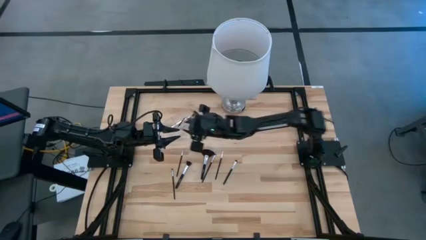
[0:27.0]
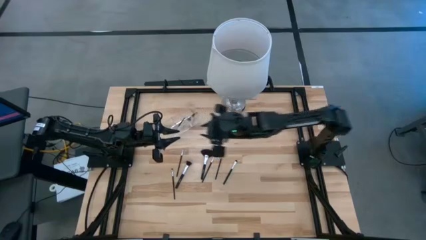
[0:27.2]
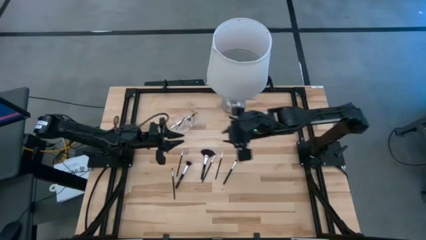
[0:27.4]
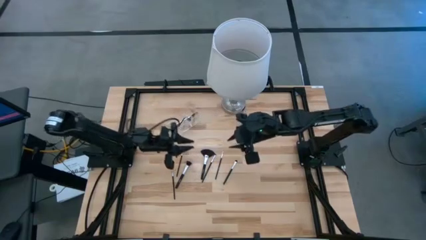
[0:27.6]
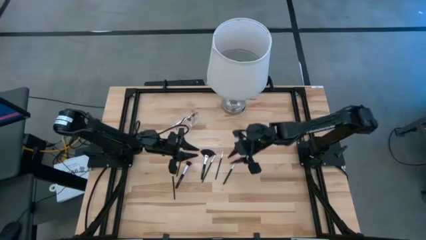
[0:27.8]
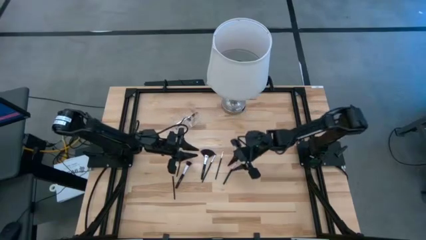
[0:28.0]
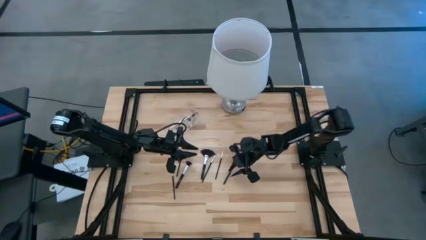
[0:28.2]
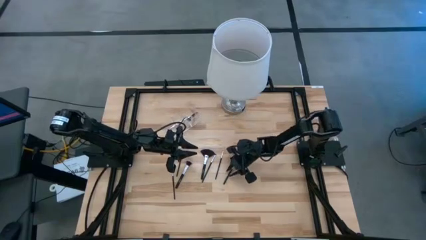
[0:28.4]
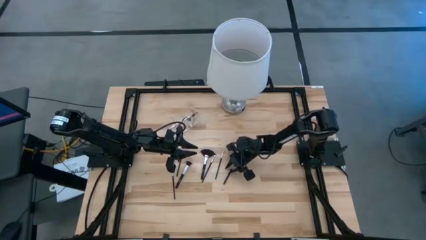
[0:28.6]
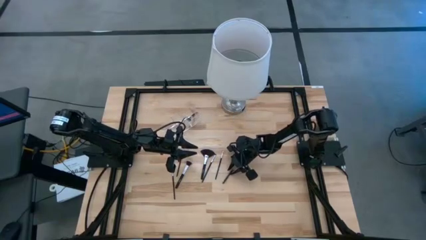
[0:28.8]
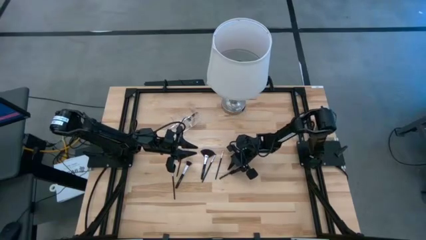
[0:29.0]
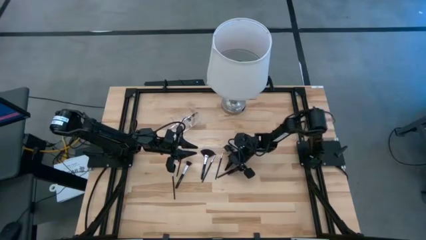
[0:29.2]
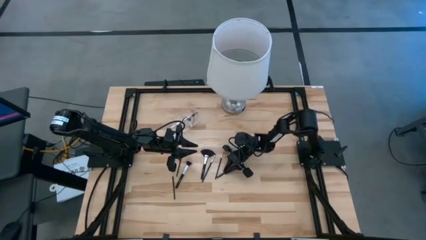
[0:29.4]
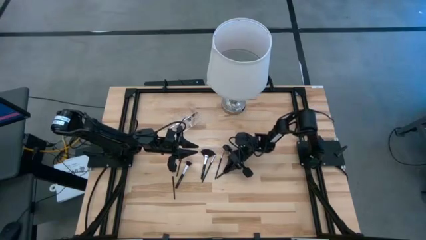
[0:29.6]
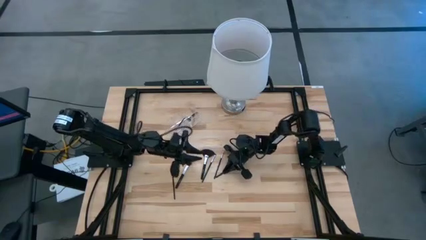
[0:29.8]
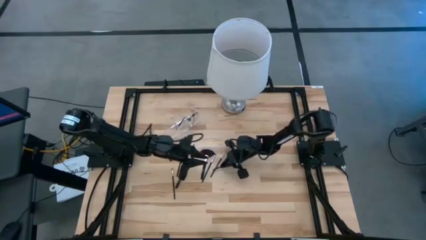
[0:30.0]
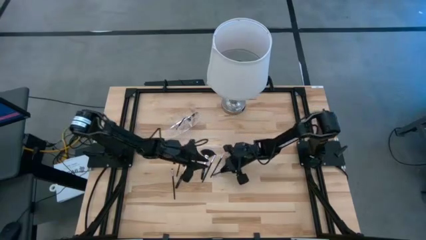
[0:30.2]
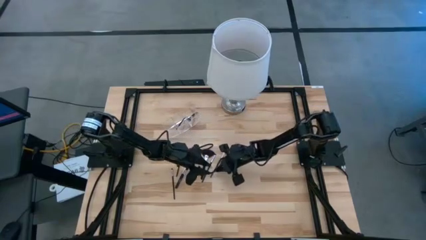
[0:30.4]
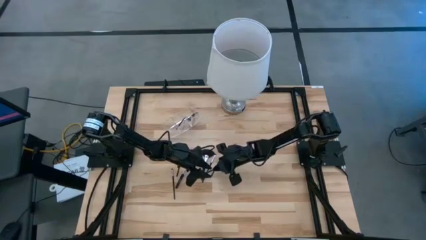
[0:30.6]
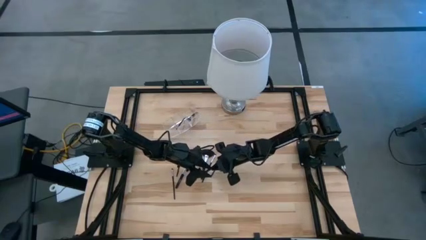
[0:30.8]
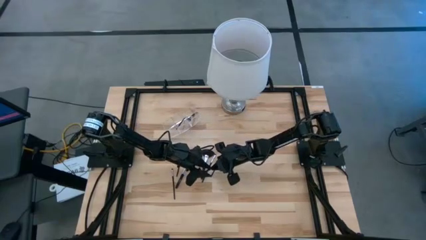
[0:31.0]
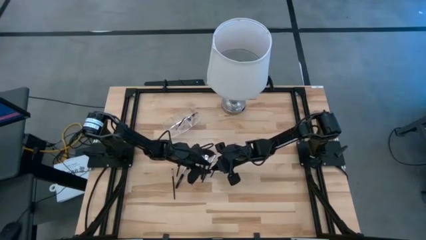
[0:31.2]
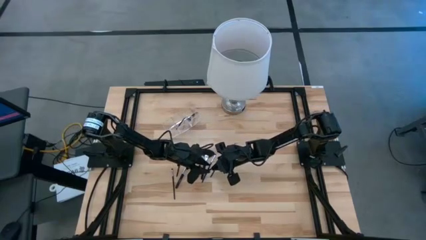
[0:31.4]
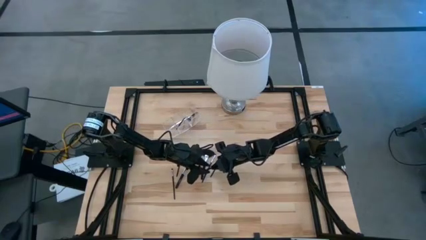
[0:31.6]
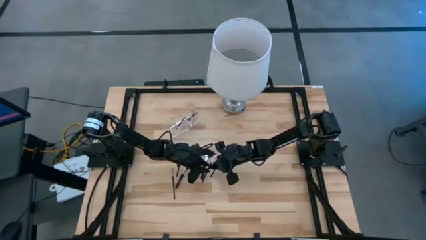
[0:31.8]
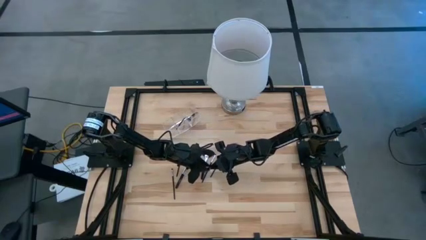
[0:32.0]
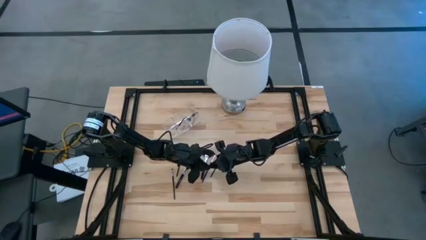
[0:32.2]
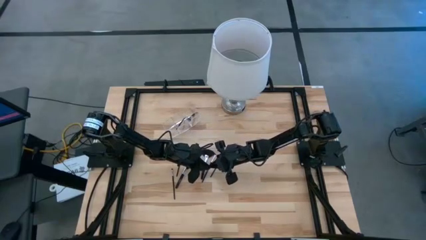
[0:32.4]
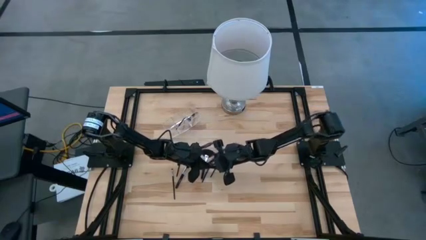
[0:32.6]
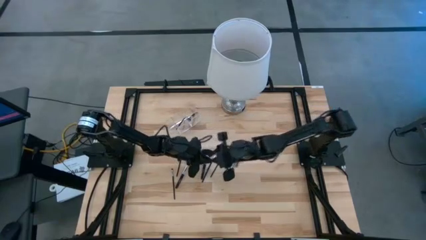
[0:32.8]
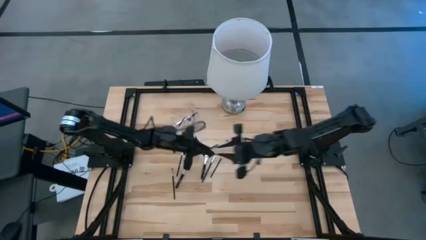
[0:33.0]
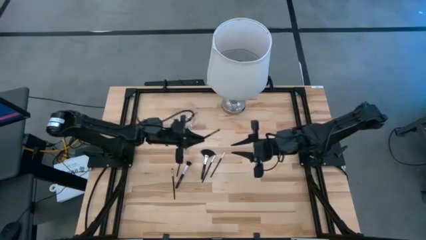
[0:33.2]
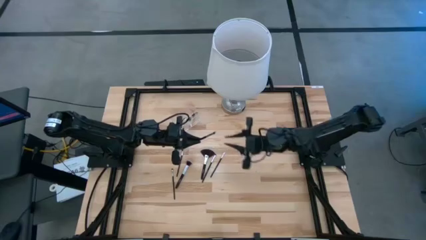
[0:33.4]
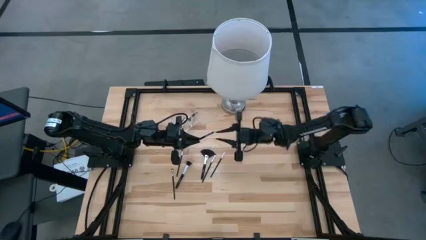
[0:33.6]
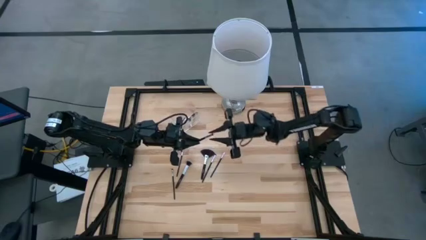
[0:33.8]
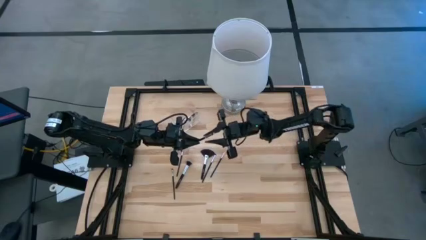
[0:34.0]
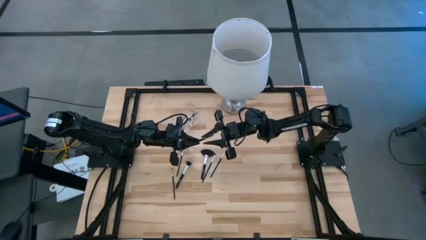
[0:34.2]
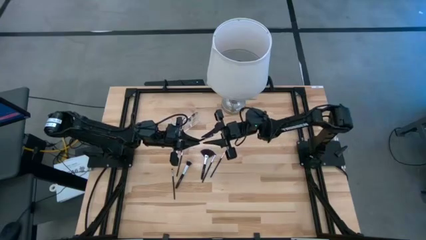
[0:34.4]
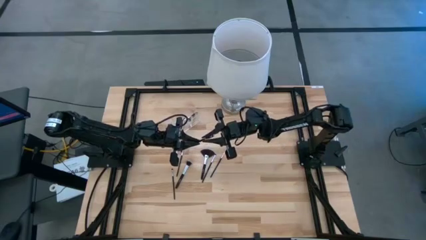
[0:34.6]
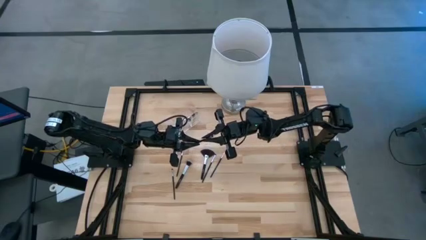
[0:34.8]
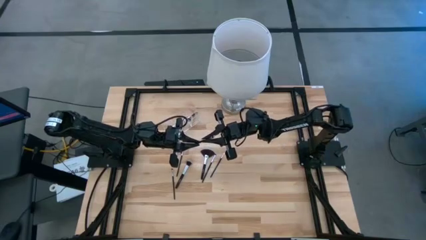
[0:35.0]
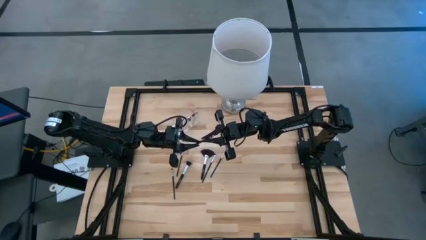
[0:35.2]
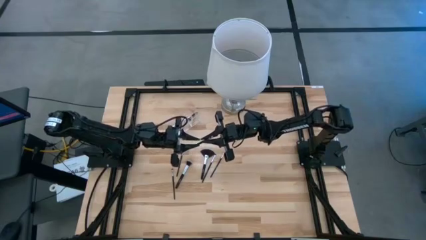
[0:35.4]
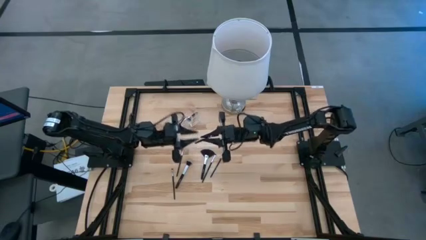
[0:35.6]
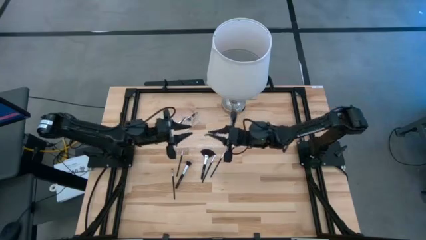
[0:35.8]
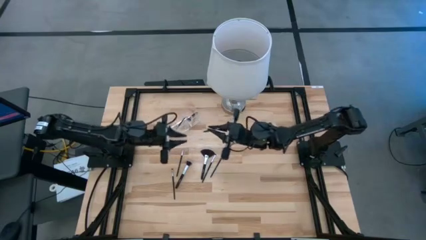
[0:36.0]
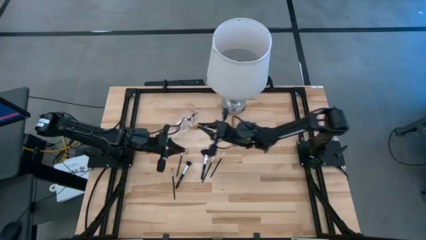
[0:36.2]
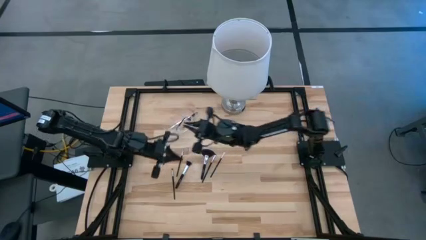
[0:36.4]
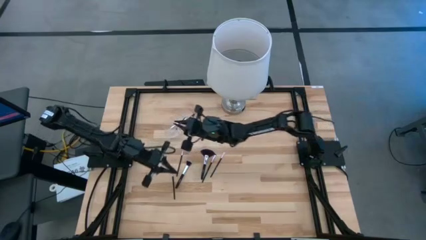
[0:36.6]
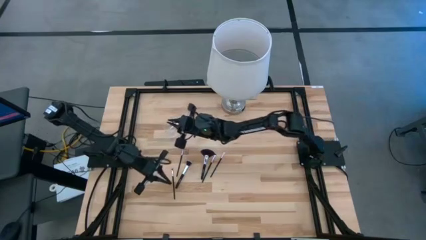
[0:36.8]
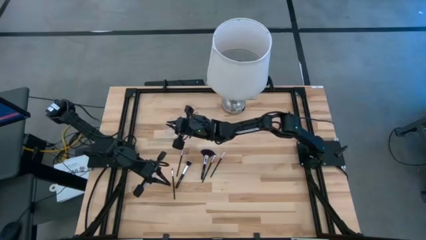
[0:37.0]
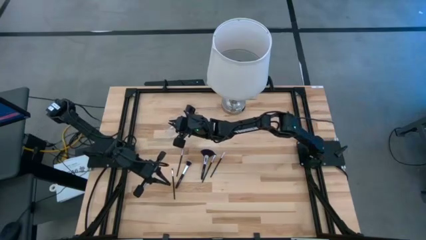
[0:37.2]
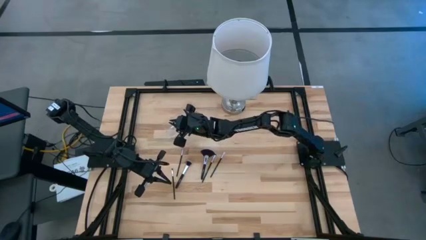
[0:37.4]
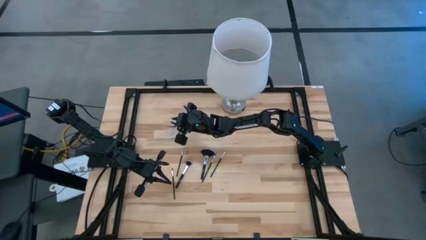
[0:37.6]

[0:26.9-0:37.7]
Task: Put items in baskets/containers
Put the black powder brush into the transparent organizer
